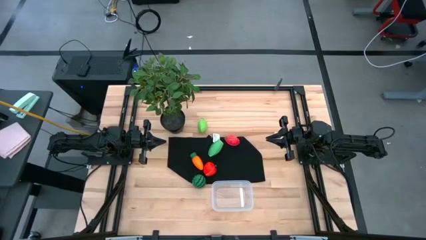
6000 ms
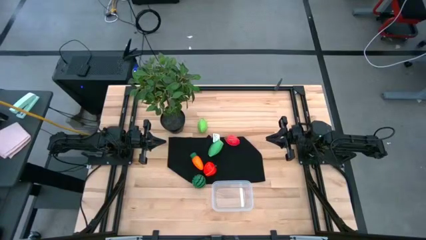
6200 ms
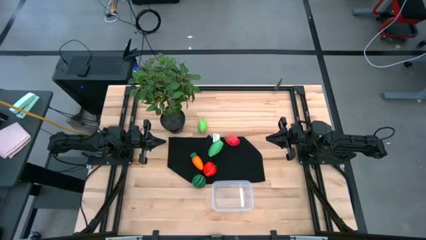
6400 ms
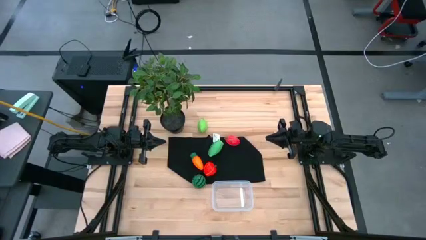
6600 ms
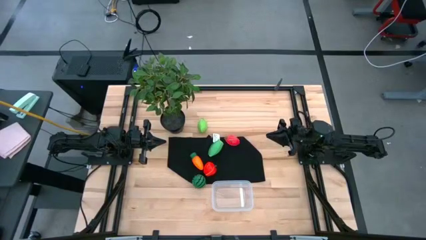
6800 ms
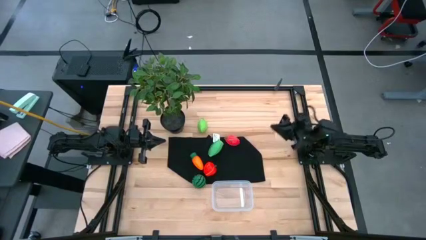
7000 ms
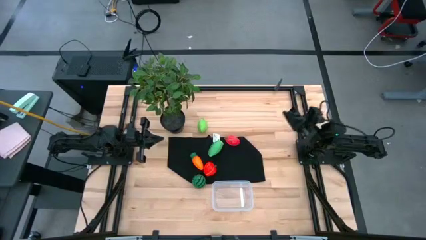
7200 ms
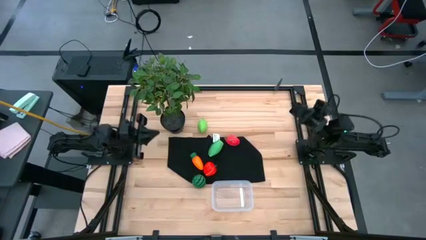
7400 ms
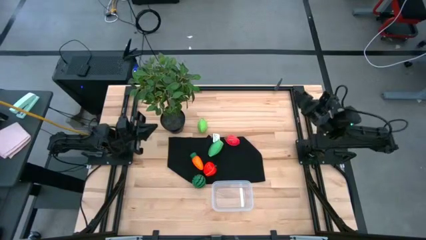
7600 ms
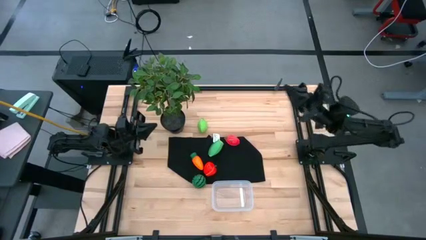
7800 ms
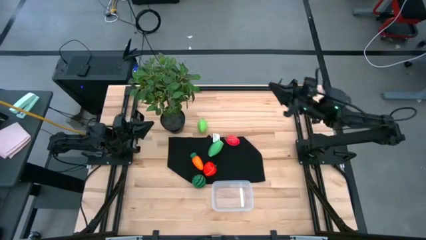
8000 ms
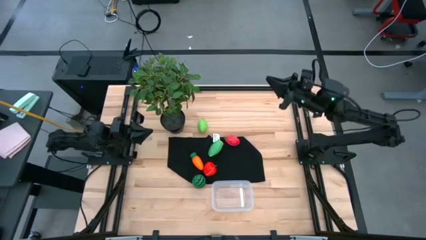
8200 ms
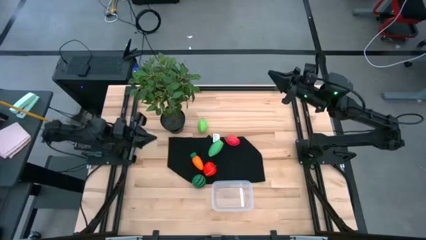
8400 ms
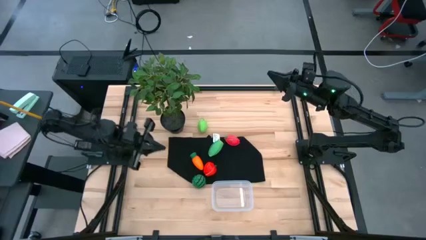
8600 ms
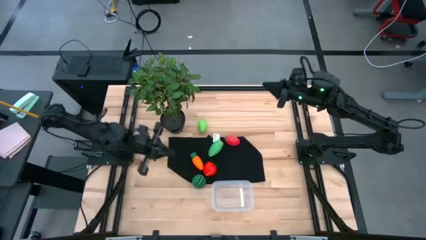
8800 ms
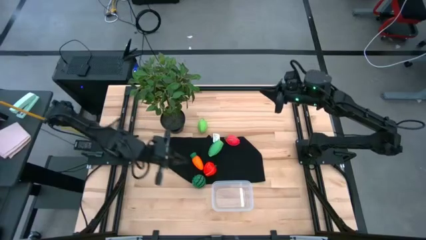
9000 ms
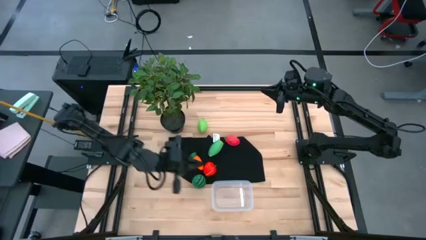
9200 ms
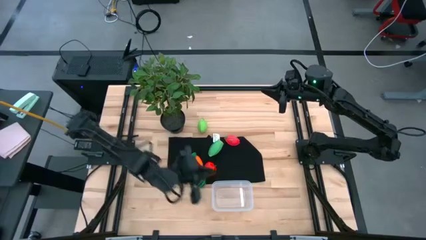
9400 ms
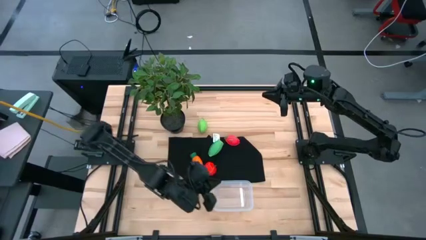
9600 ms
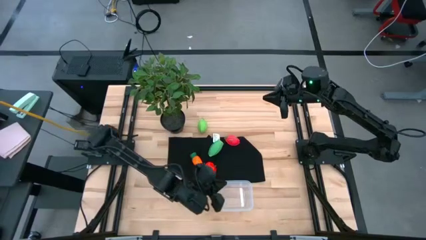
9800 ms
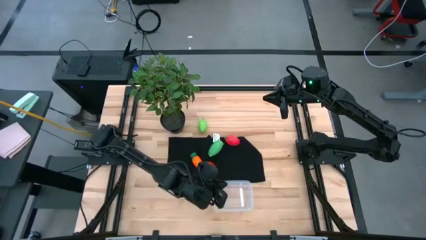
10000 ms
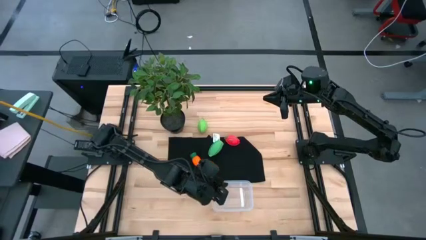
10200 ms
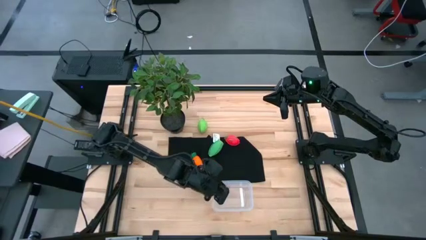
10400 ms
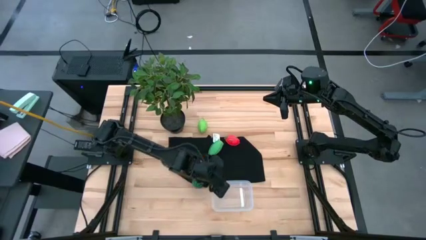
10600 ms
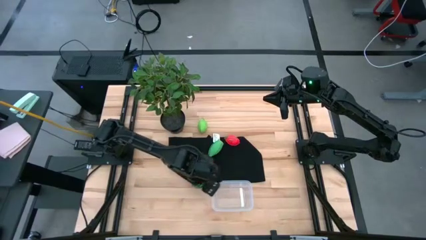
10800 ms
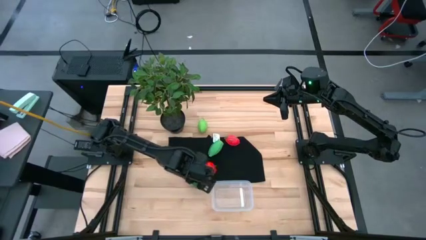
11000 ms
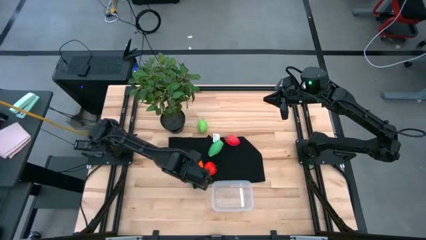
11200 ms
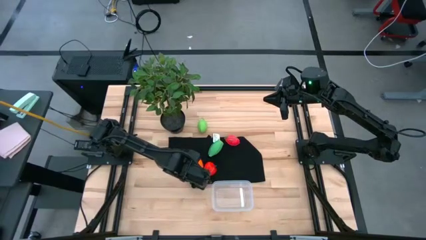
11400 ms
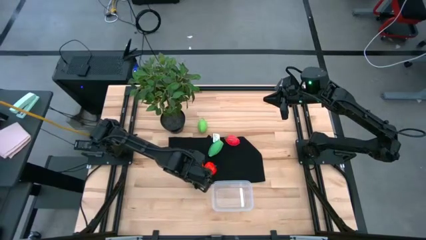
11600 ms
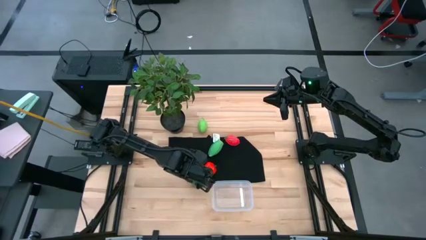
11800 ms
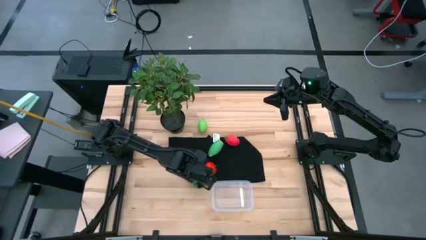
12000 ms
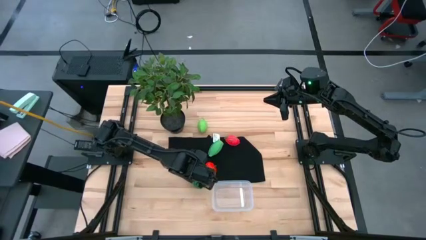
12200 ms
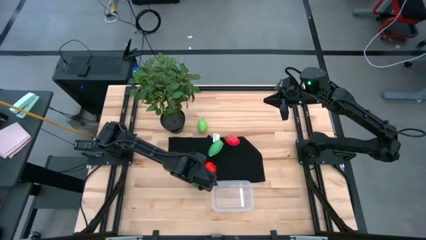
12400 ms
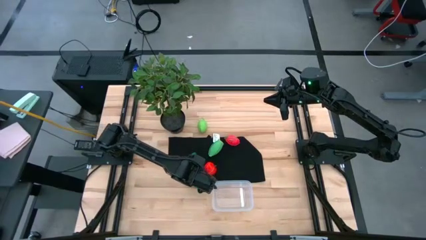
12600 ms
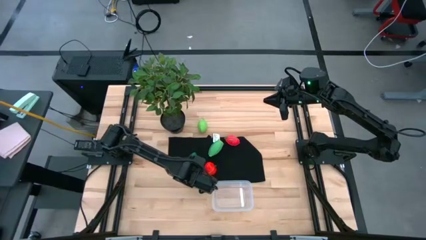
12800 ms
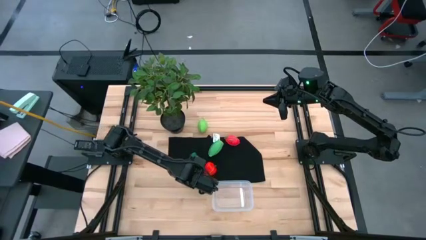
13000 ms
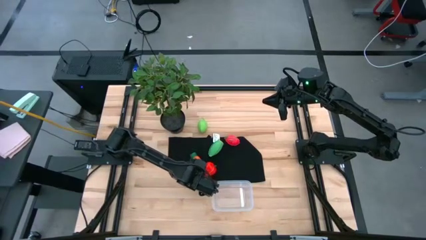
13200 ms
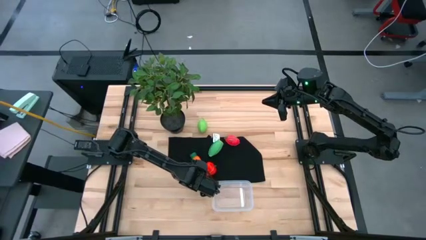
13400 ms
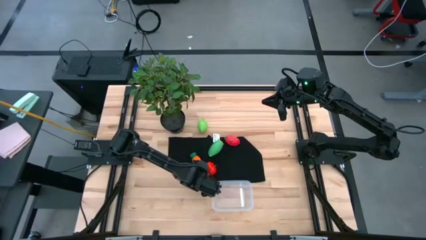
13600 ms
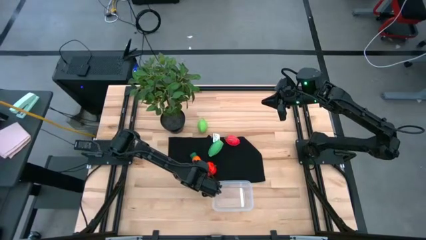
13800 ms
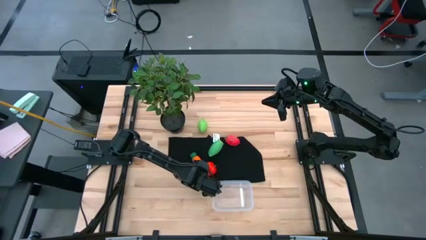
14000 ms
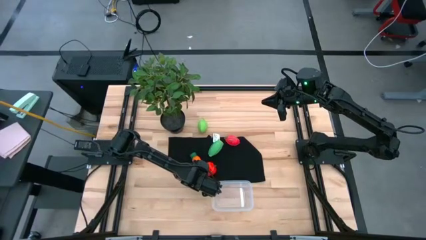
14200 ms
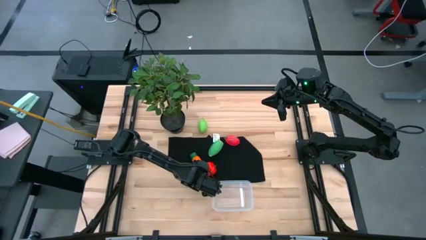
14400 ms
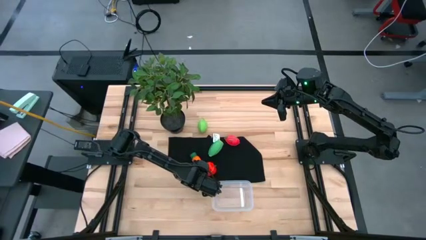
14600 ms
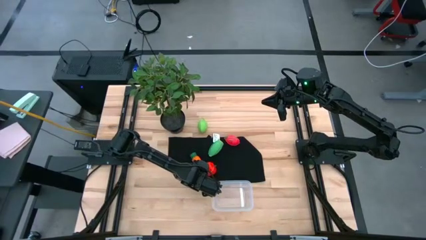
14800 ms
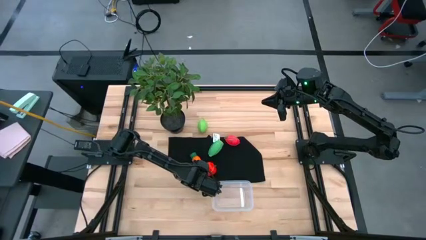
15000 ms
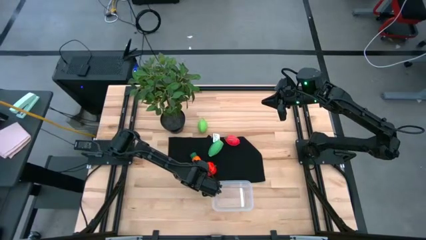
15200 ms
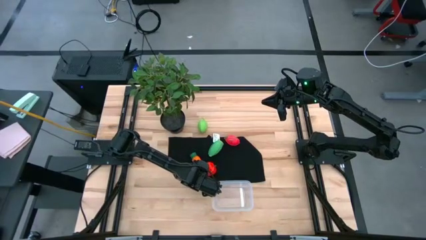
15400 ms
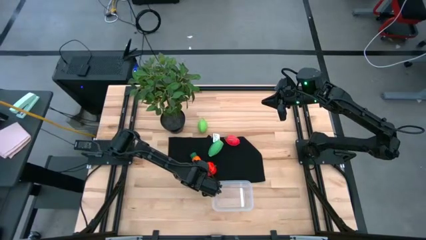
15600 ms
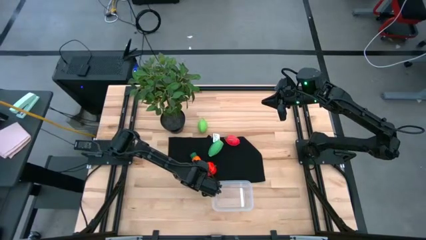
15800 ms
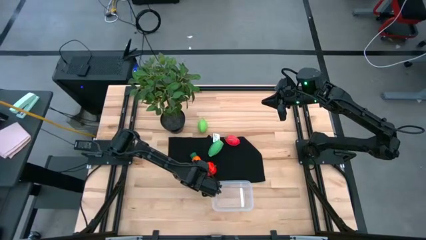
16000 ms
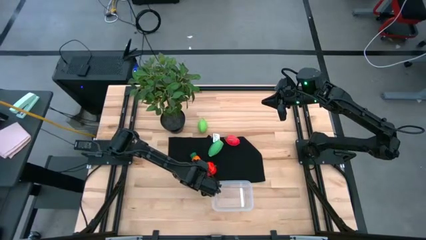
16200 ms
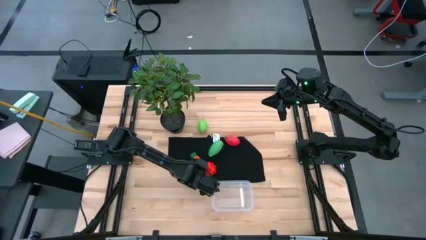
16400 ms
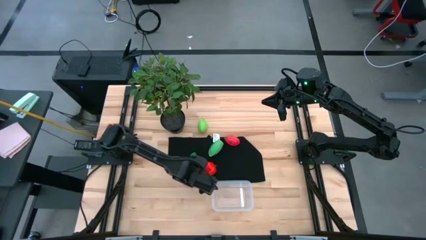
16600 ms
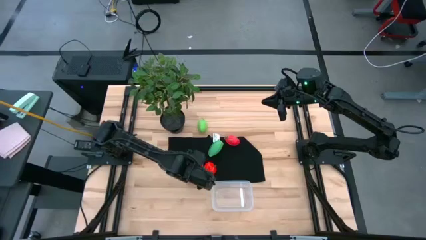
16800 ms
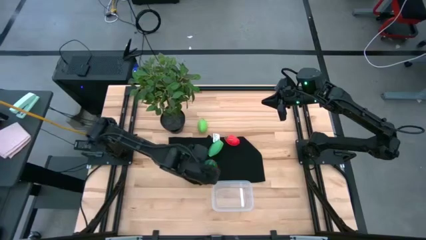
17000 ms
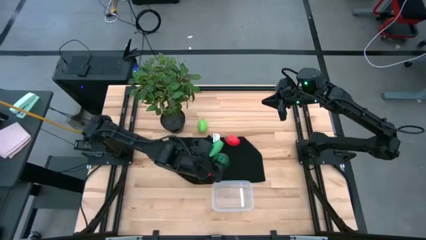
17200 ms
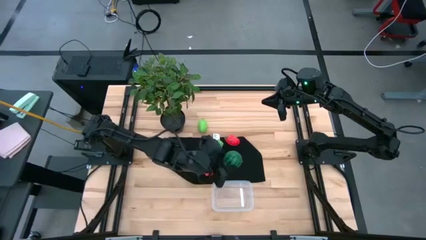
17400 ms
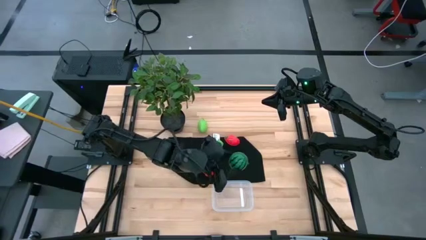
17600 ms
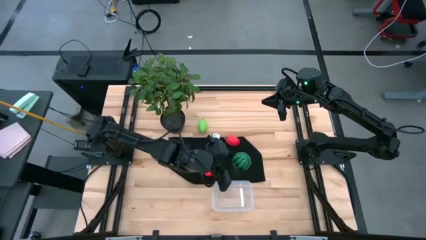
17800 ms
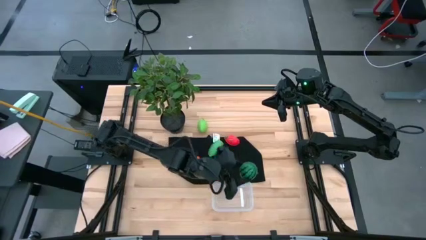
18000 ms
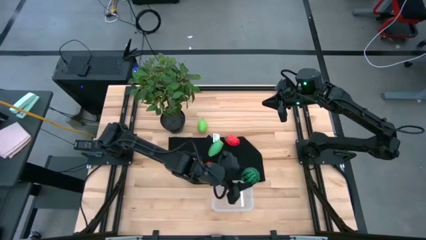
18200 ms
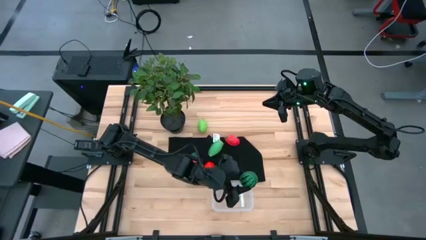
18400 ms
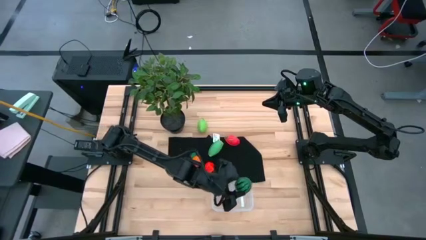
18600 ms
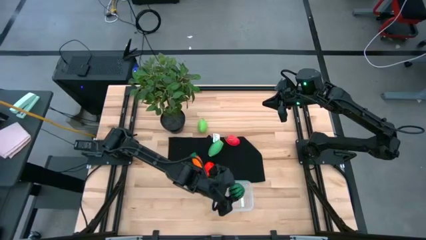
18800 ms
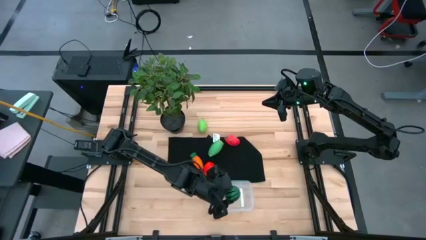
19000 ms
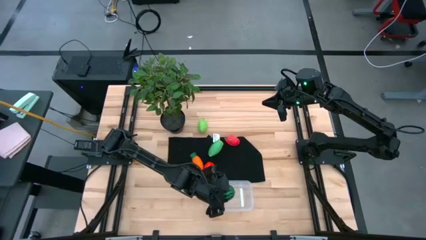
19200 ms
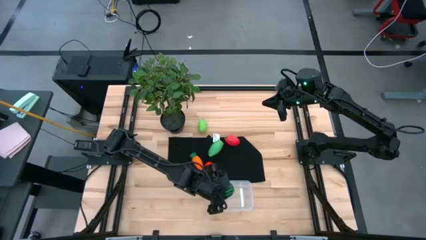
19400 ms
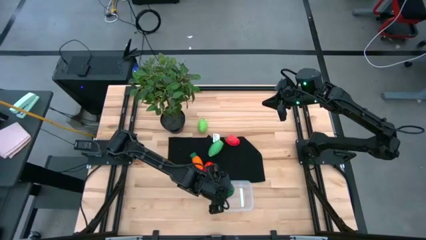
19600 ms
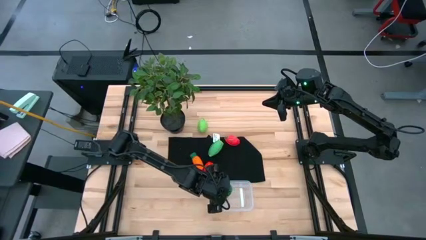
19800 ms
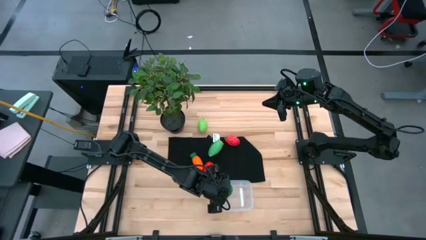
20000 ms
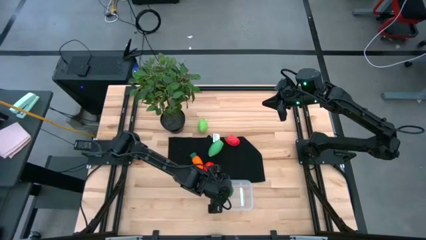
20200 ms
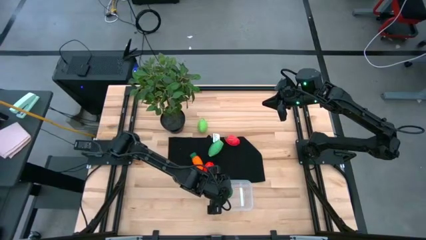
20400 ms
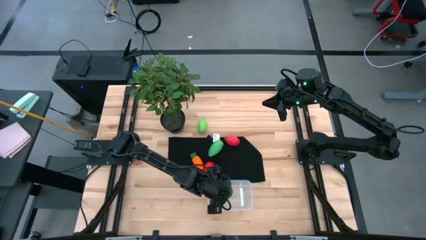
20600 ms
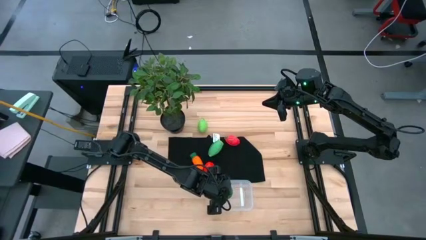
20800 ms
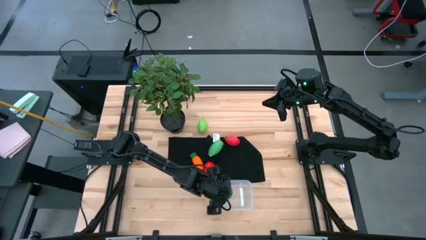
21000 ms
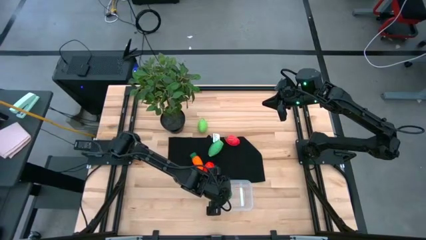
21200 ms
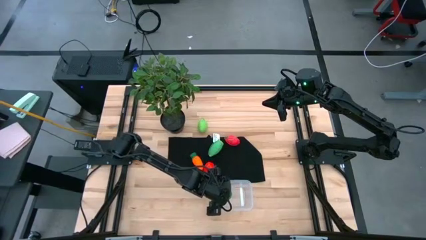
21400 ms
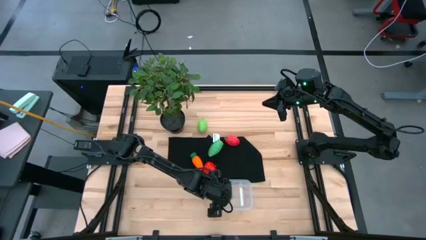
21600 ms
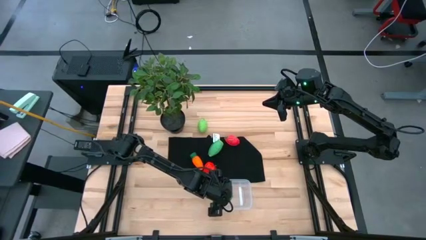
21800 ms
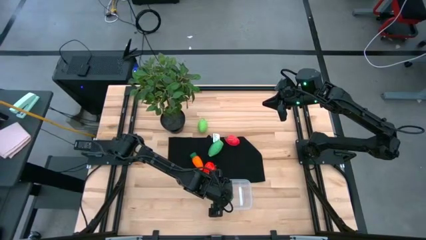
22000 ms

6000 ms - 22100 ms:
Task: Pick and placing Produce into tupperware
Put the watermelon into the transparent bin
